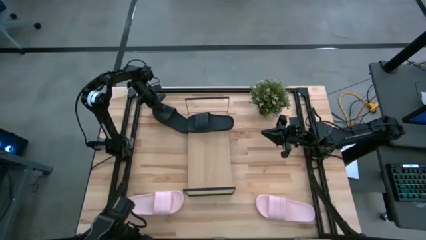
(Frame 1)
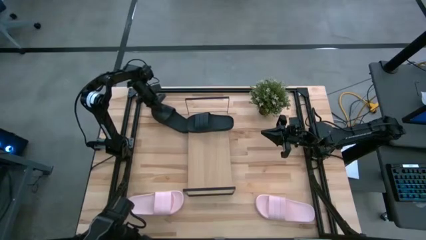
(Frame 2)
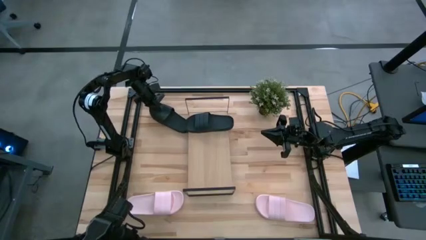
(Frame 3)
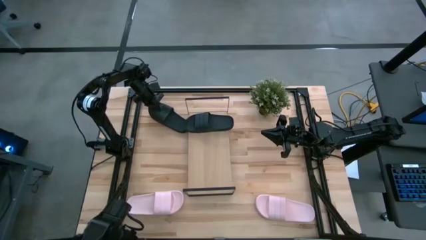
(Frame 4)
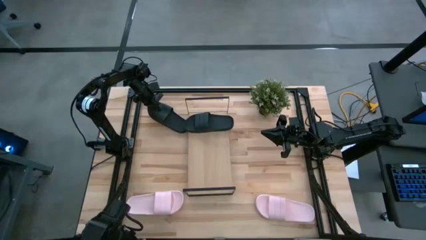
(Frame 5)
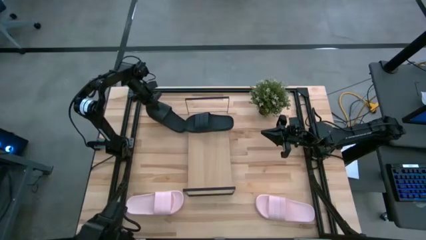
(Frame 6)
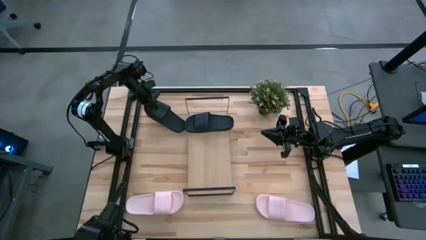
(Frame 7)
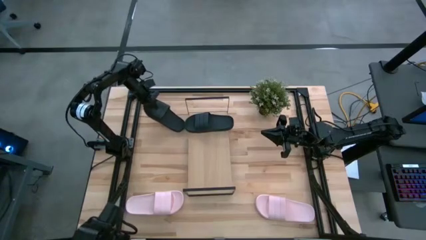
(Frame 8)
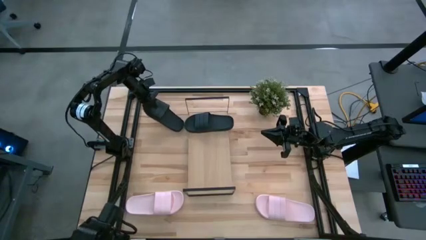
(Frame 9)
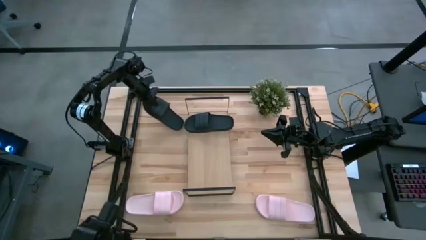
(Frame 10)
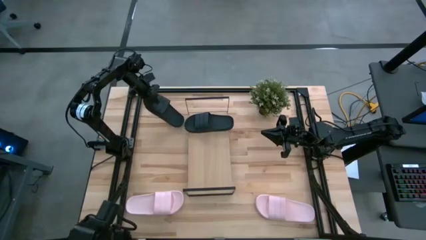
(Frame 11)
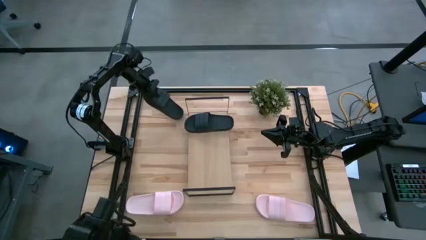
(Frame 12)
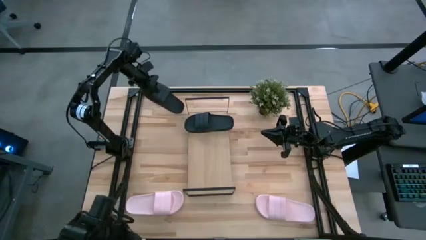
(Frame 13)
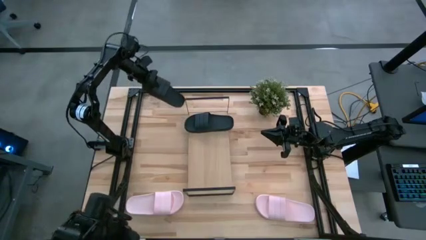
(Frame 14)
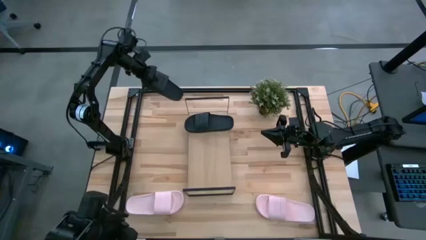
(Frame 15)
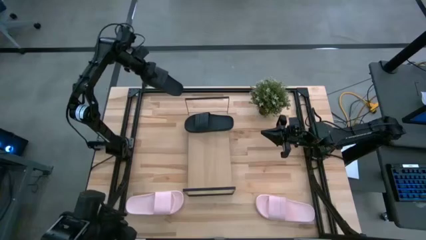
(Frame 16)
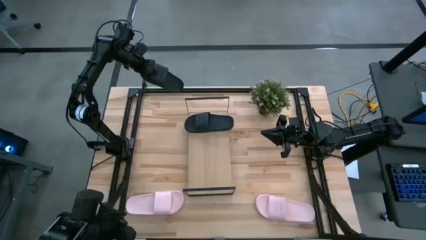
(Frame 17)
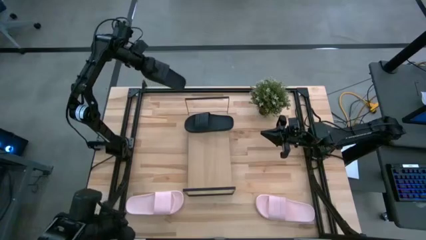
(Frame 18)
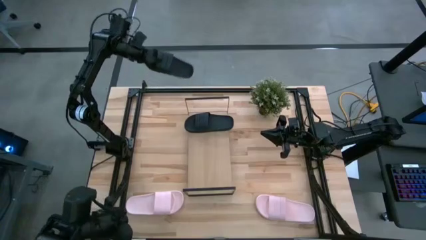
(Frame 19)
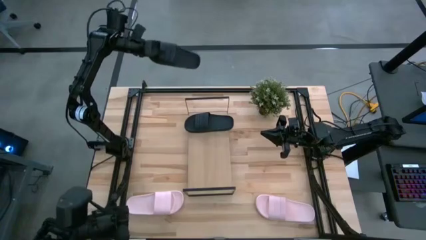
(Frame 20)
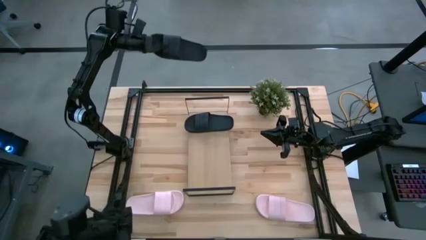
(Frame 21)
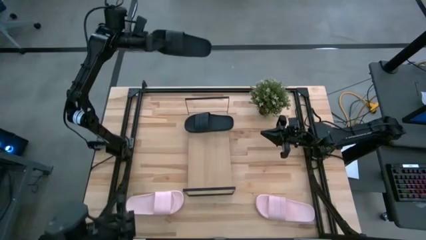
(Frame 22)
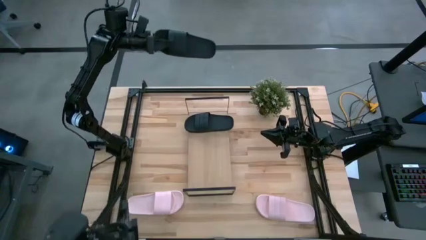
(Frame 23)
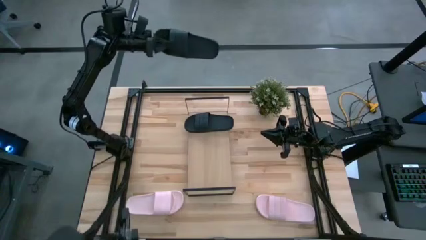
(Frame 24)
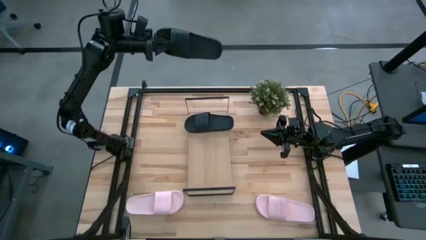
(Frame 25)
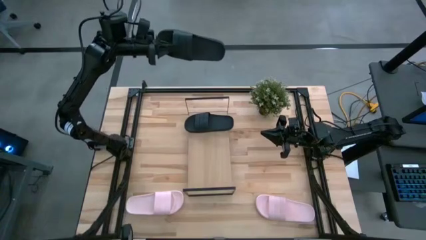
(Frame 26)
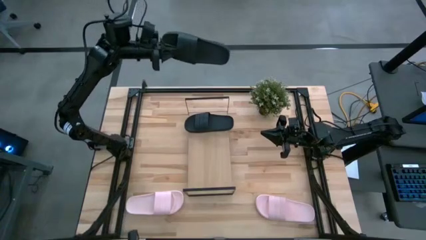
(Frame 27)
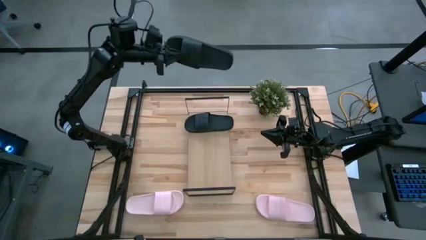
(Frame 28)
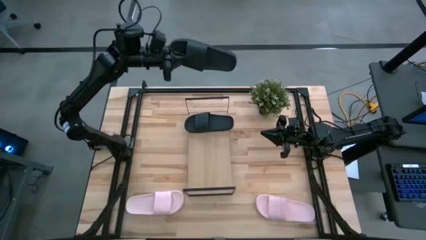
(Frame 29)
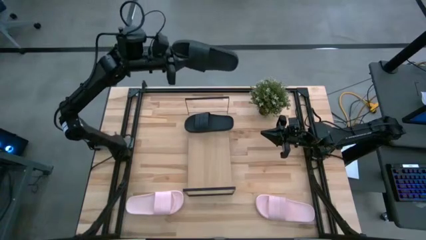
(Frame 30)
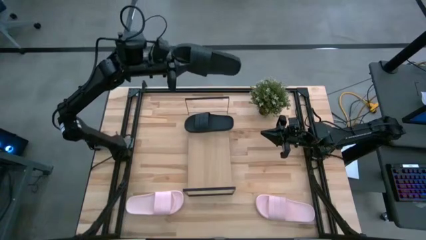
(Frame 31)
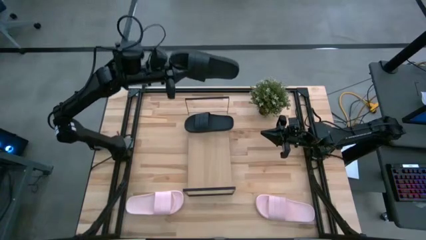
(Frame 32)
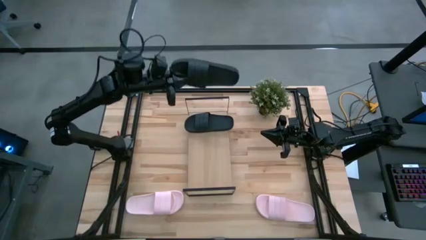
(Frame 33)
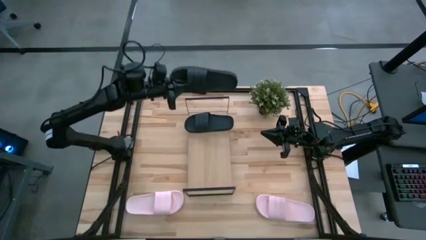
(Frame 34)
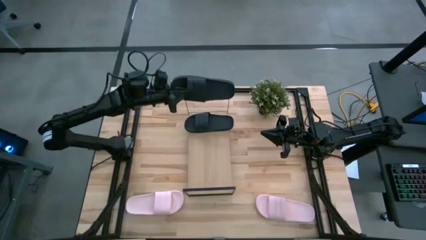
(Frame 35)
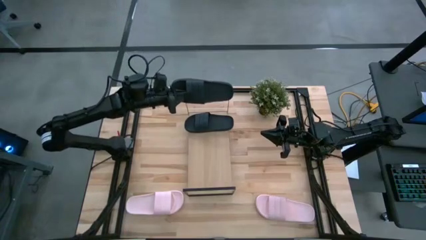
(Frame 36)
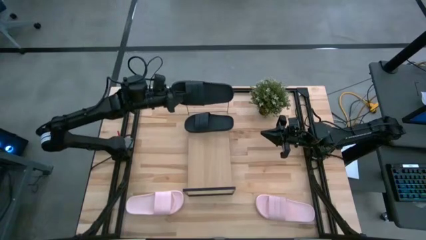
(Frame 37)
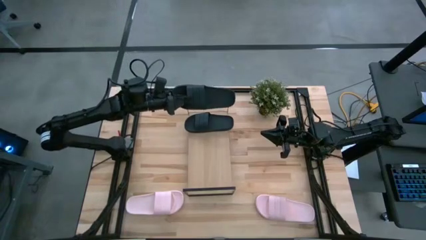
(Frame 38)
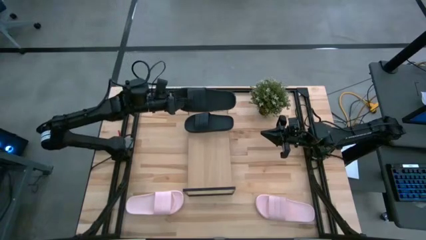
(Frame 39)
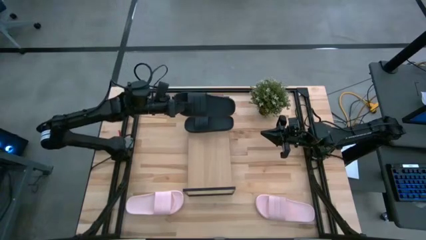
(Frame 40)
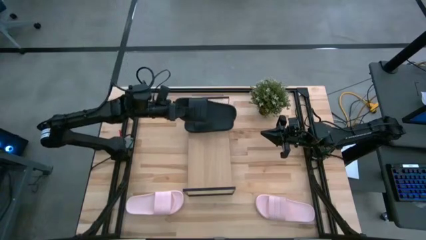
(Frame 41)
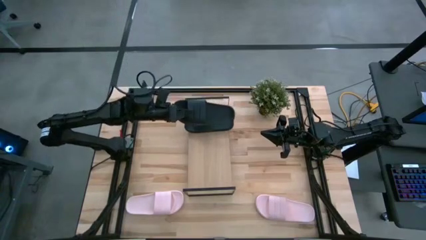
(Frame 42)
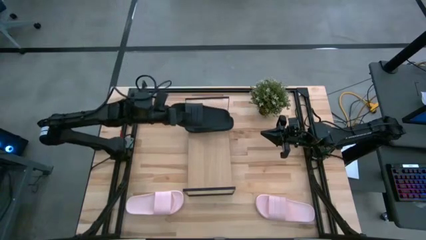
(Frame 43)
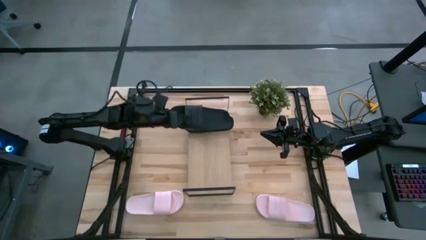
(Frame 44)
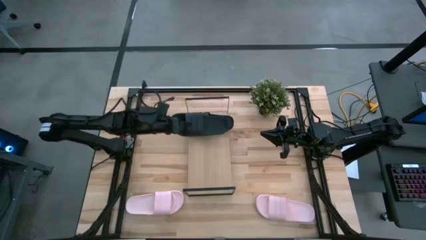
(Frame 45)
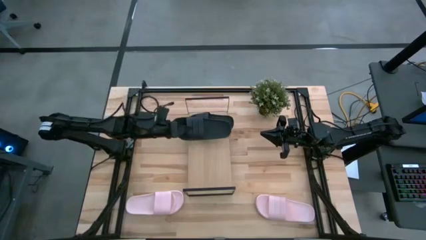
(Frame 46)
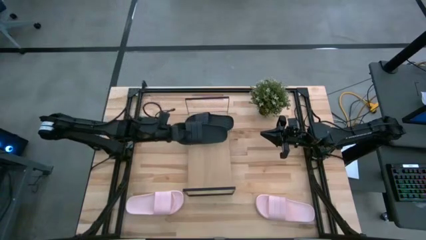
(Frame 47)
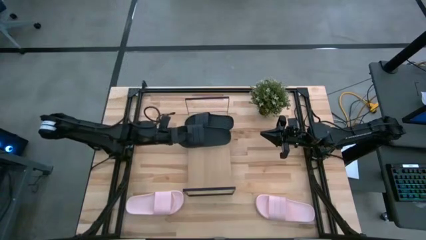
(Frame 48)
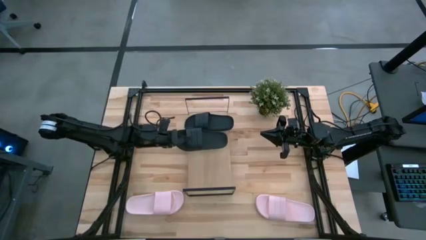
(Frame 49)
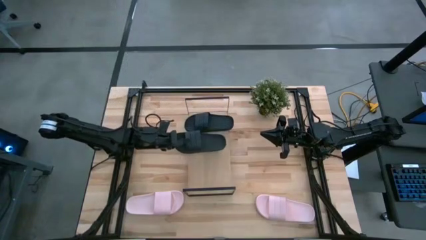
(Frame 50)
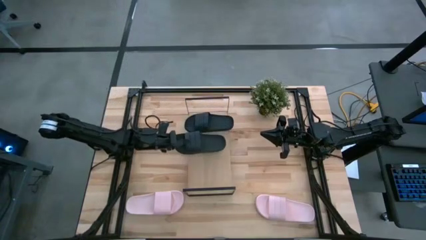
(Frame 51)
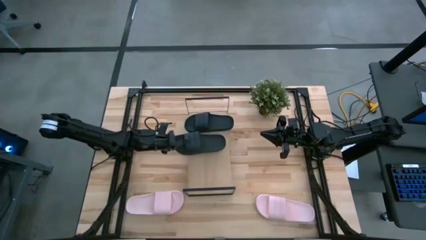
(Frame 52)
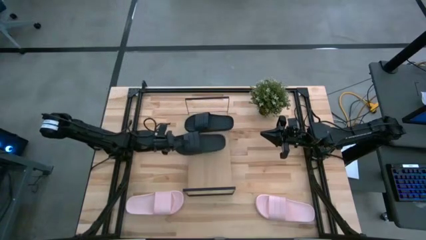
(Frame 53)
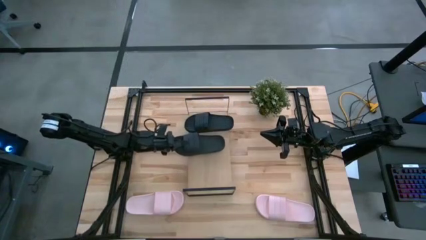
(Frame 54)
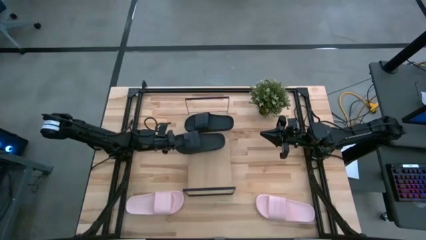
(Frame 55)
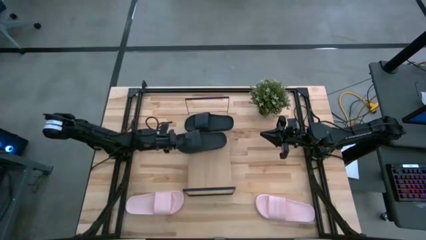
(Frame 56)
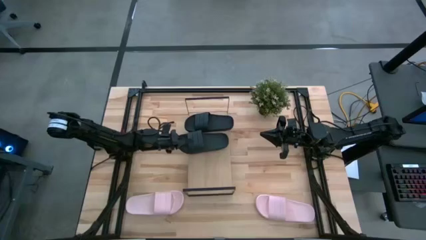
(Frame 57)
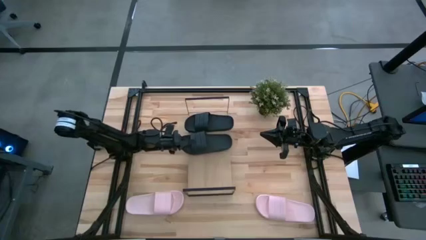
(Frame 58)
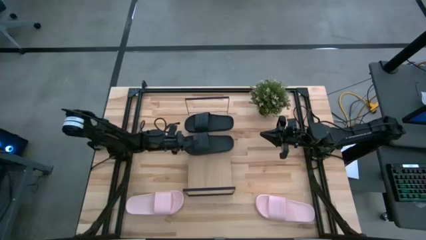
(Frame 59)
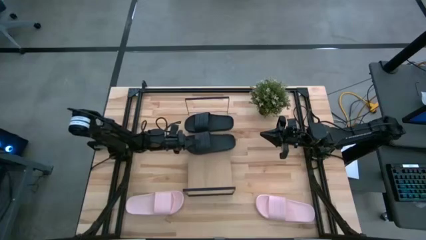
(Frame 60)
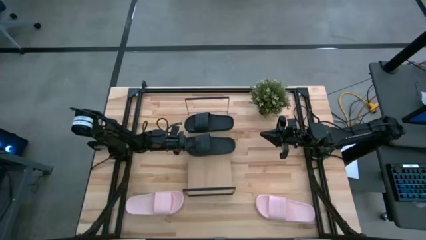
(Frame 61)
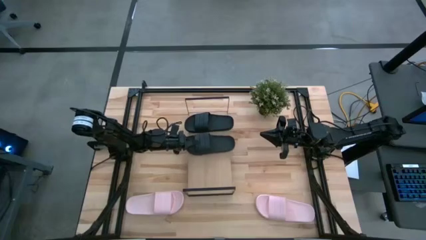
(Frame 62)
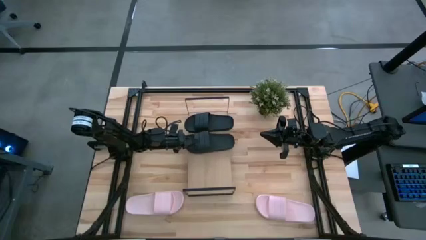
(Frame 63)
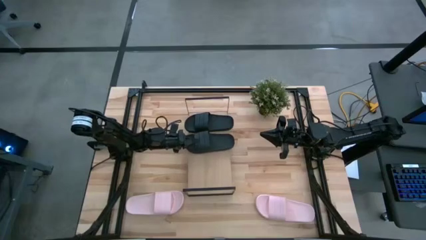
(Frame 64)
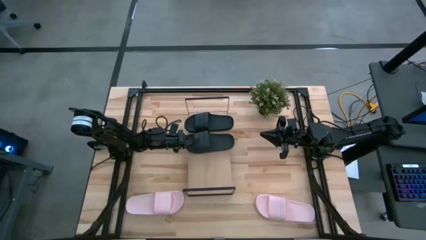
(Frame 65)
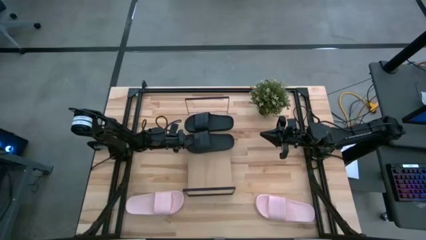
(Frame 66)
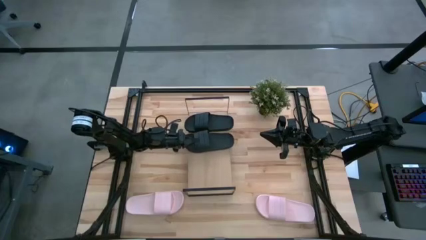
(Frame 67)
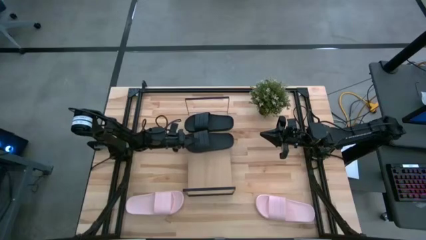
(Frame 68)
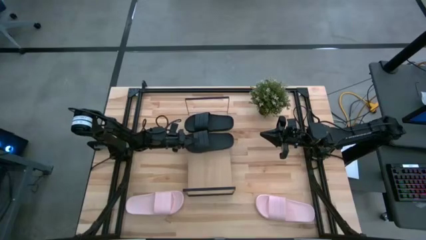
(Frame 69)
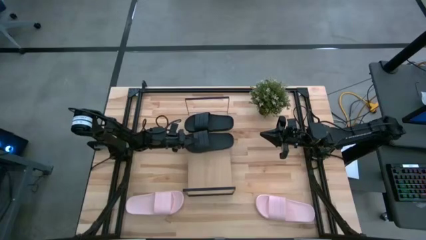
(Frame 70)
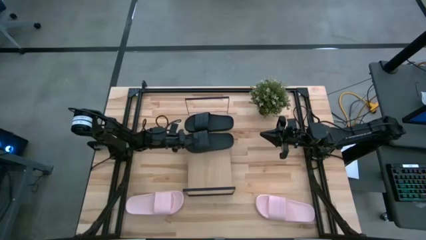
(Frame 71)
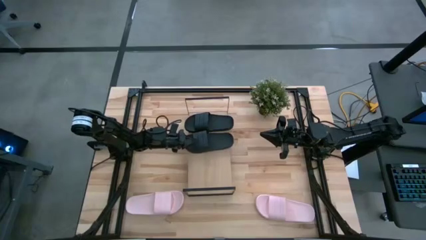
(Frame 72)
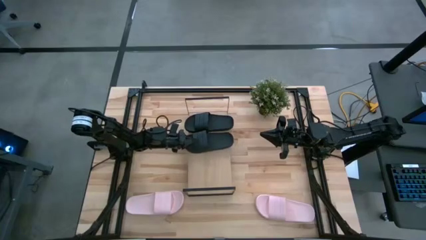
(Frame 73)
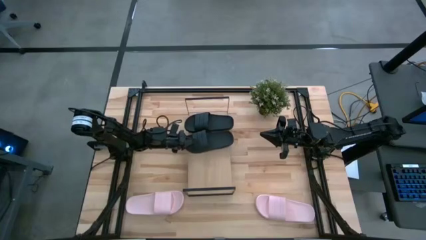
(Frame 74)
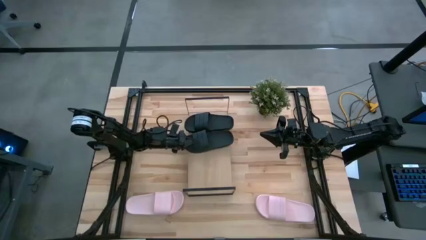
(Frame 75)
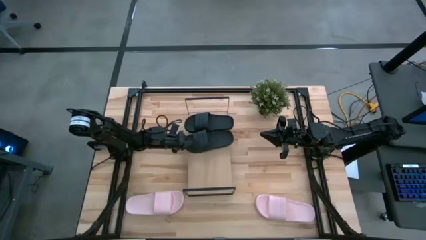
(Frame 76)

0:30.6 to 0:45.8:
Task: Pick and place slides into the shelf
Put the black slide on the shelf
